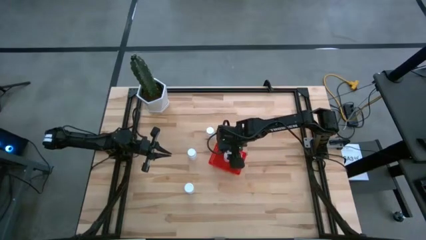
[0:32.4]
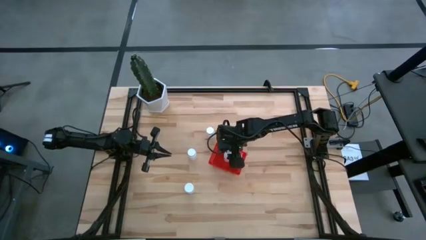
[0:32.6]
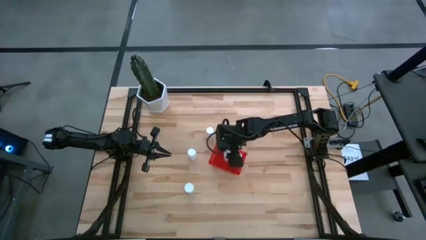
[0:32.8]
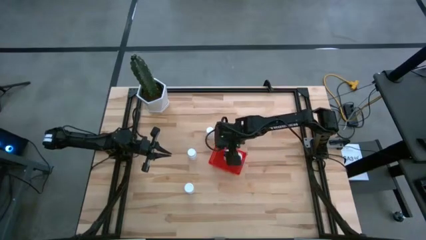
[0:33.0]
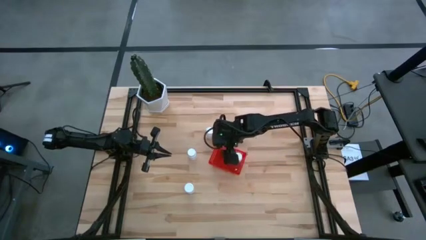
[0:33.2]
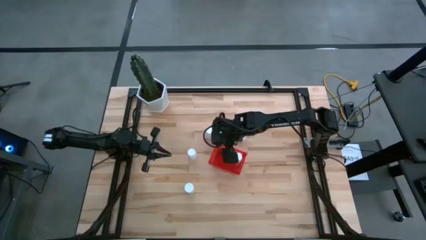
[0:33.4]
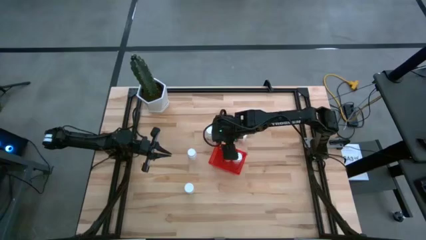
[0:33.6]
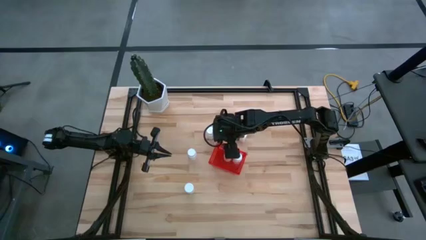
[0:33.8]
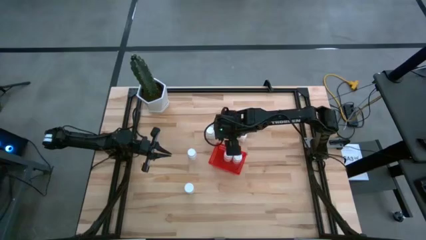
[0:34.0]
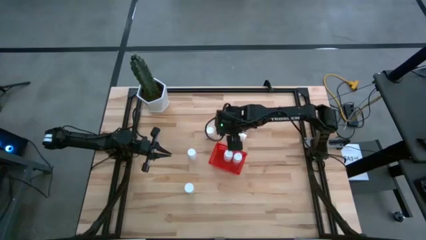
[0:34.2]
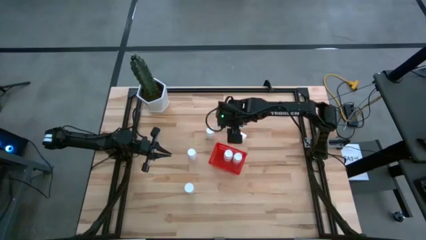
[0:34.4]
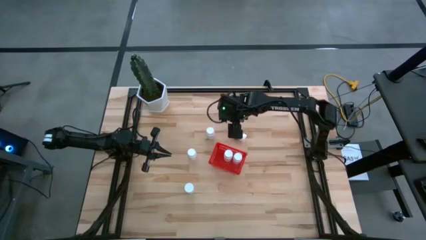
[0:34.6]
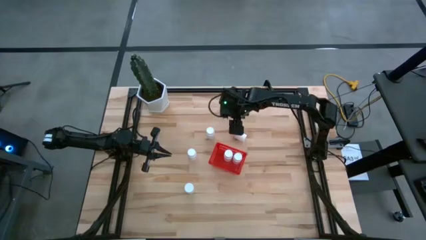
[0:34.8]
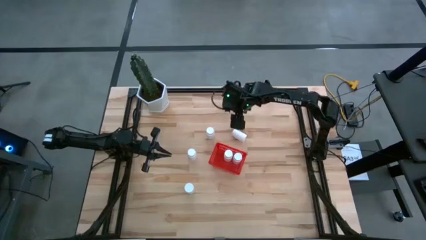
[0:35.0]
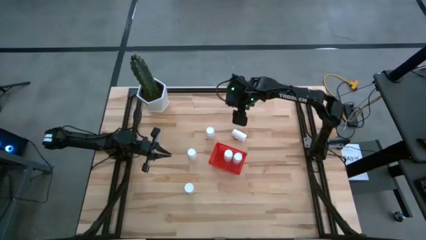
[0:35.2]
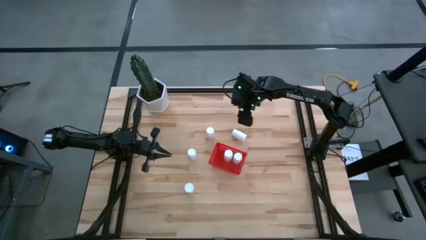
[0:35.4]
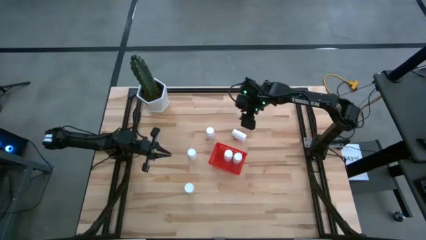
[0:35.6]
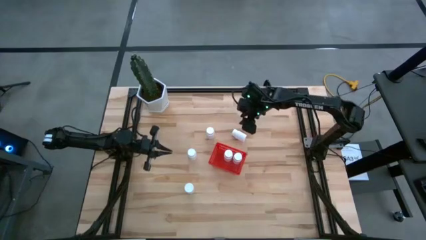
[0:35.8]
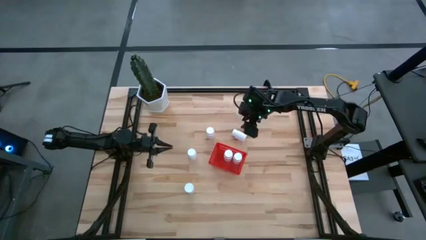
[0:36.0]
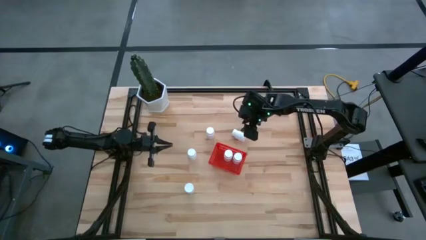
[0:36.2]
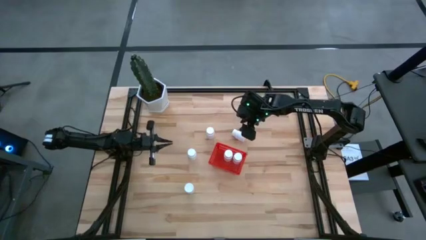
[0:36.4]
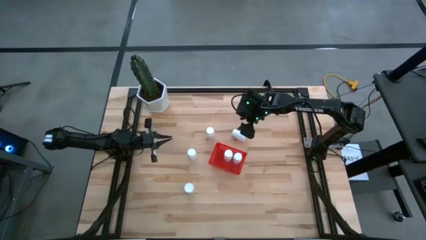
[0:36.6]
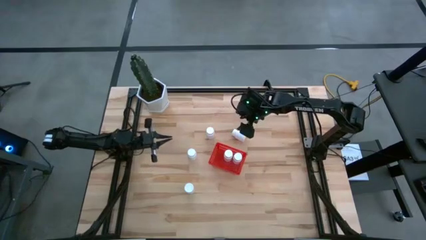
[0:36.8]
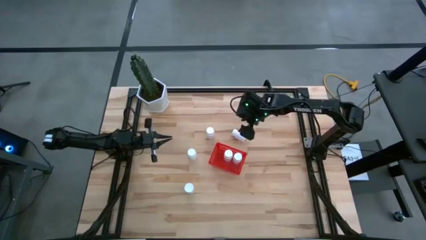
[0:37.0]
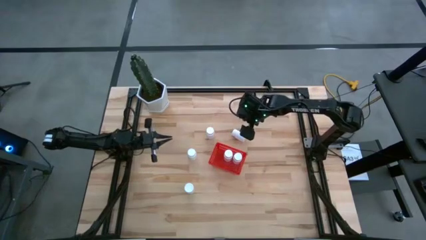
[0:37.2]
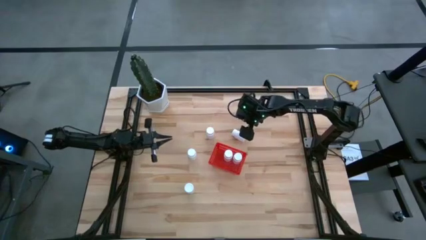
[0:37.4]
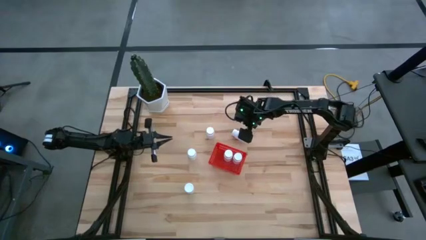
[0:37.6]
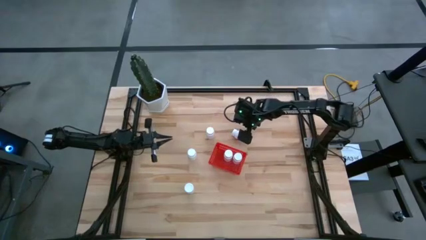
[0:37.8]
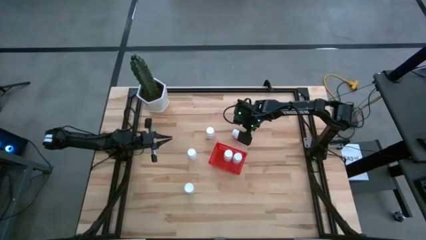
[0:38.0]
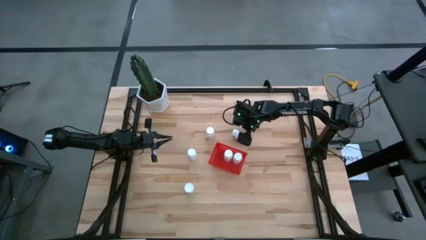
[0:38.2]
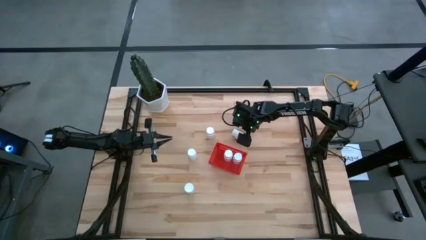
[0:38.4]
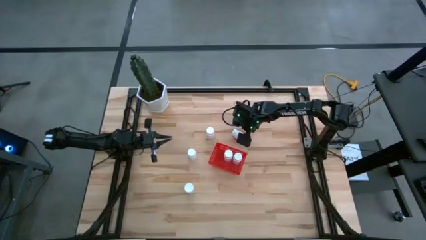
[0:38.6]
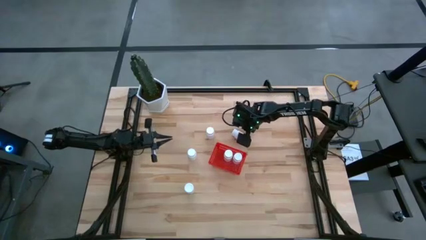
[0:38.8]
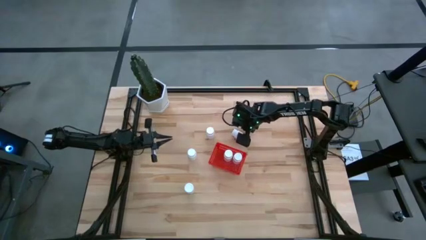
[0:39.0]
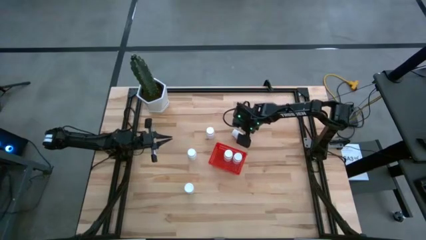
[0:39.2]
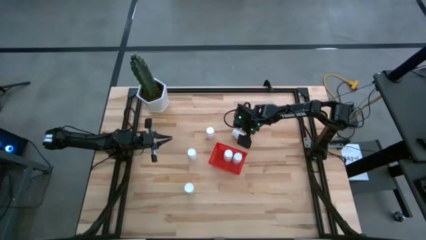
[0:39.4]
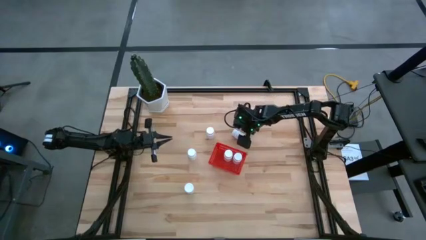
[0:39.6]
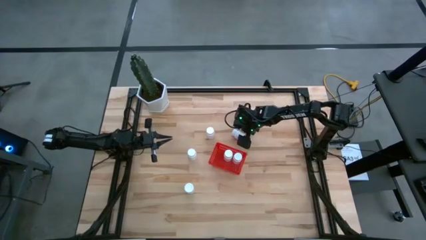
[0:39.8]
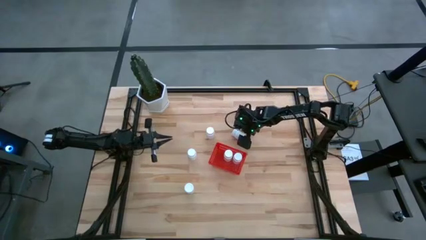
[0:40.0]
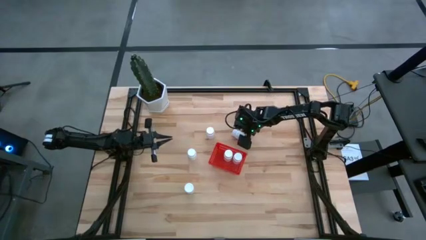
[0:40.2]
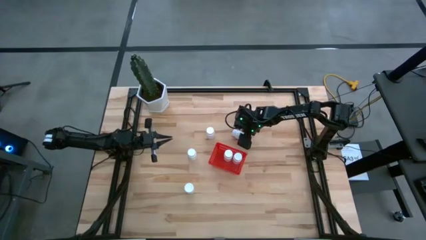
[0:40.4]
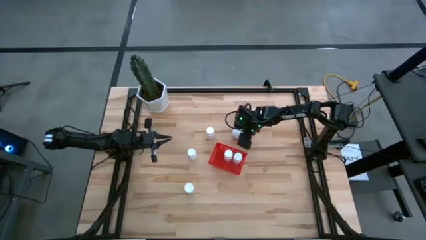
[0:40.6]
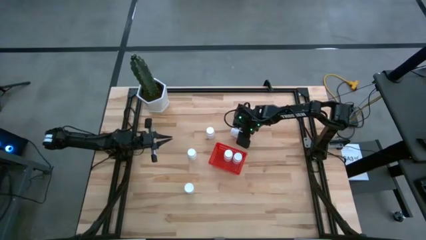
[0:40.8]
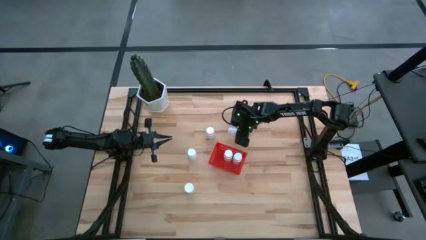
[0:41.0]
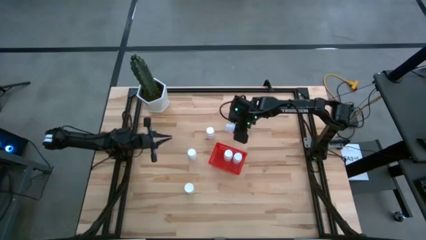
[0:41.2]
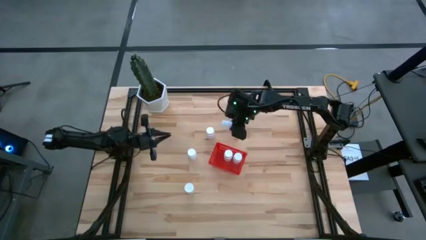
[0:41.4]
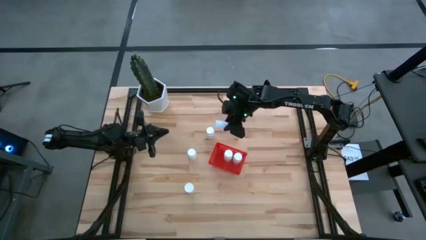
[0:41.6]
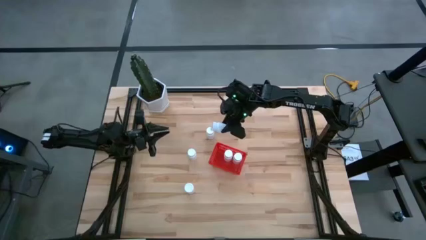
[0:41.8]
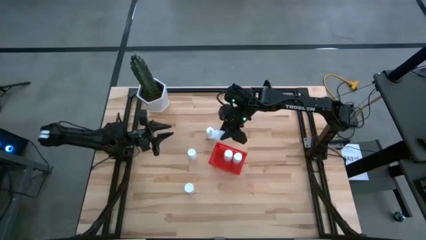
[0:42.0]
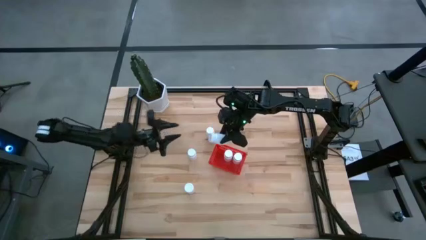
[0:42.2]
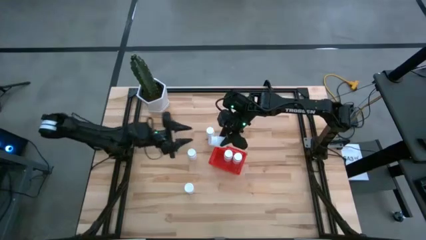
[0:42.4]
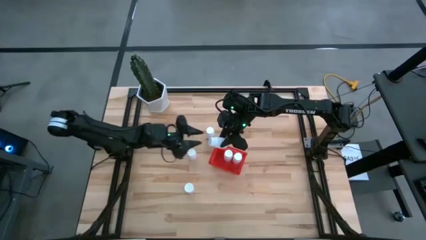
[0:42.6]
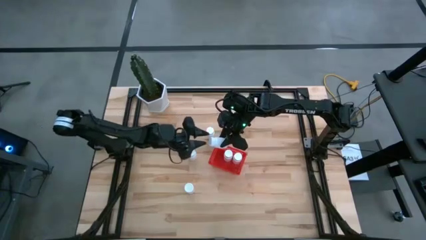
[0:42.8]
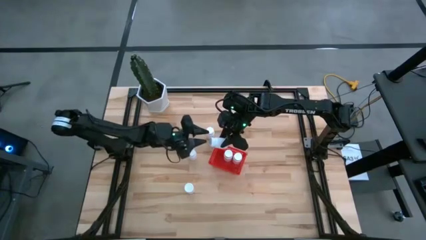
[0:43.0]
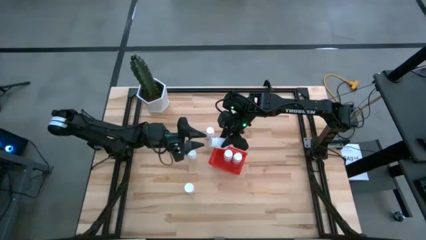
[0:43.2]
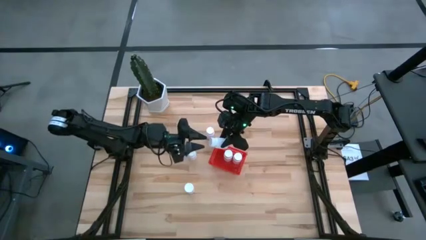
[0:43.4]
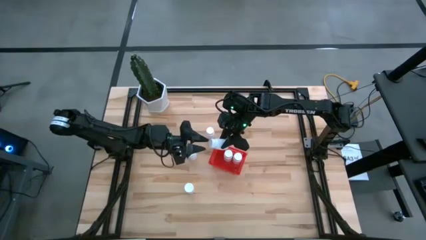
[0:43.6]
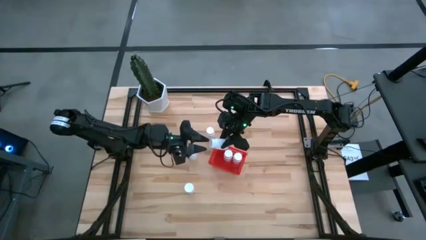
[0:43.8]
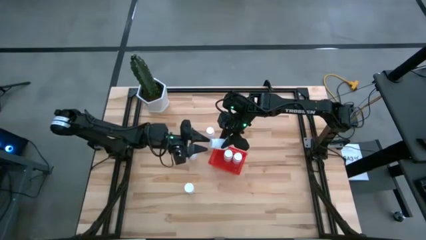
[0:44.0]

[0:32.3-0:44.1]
Task: Pick and place pill bottles into a basket
Put the white pill bottle into the red bin
